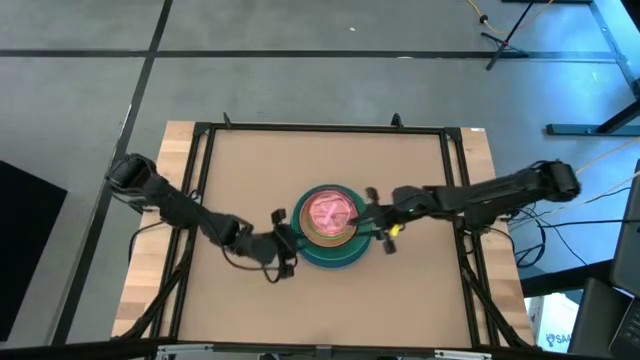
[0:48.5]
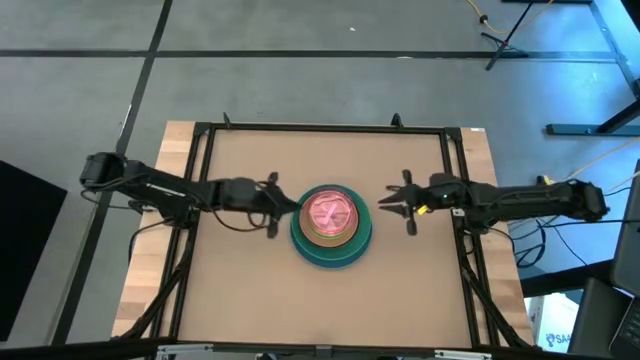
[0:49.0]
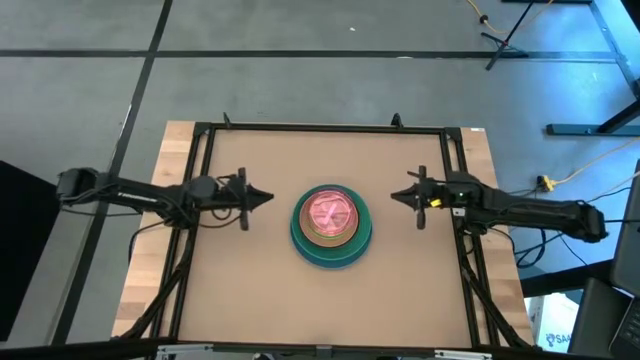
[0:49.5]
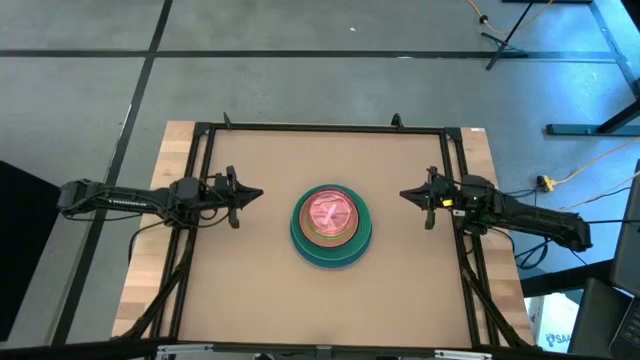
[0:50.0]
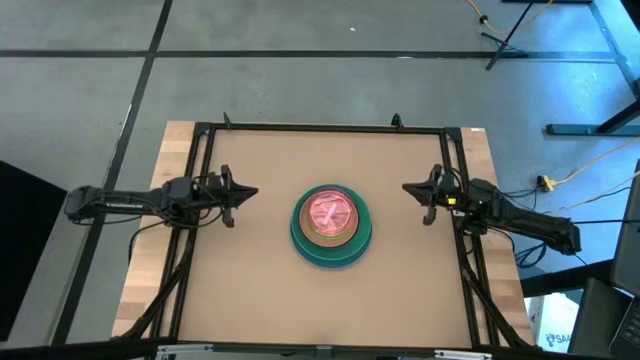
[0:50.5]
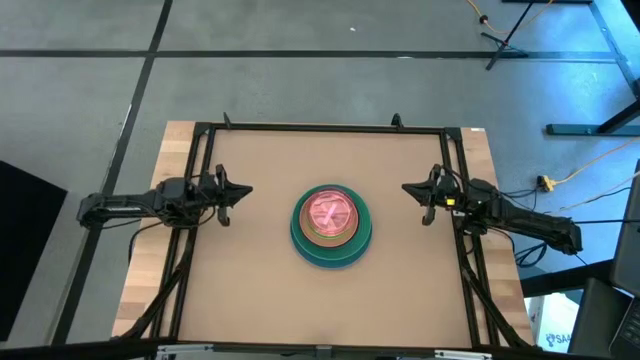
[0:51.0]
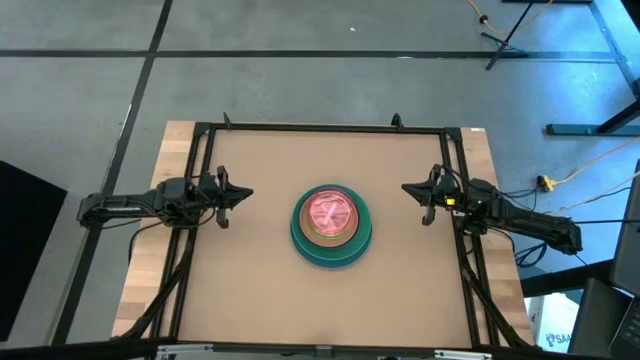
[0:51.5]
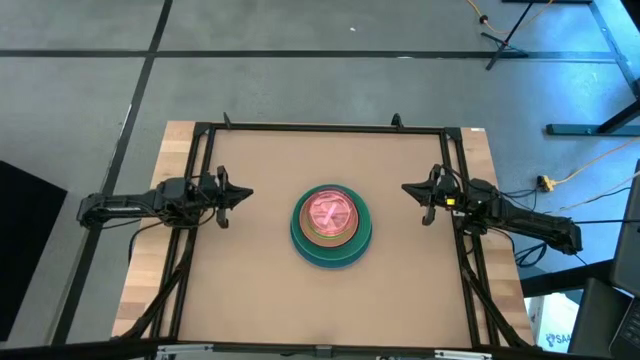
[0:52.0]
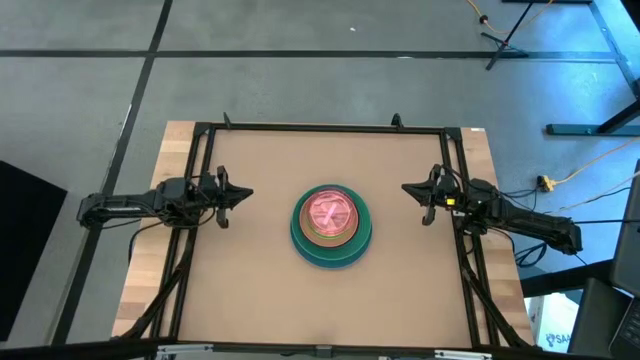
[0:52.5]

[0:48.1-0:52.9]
Task: Stack plastic plates
Return to Home Position

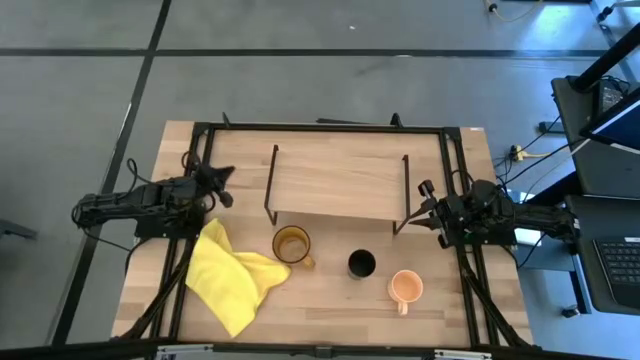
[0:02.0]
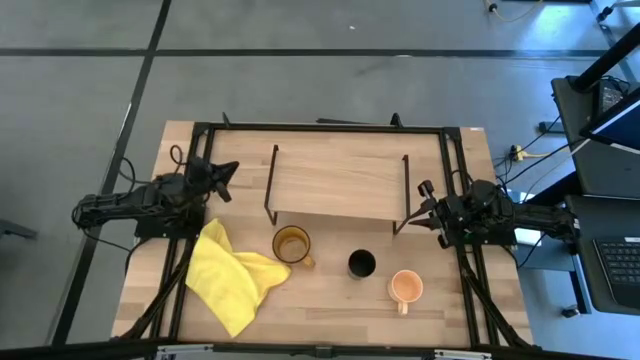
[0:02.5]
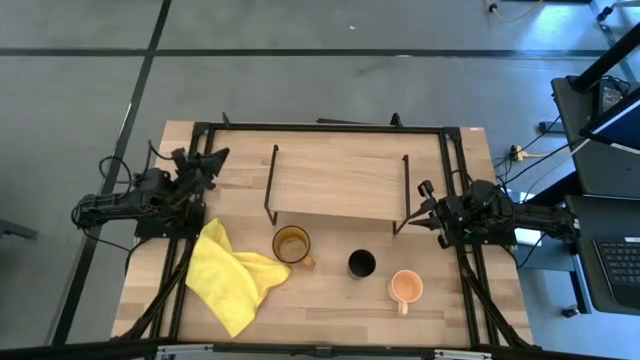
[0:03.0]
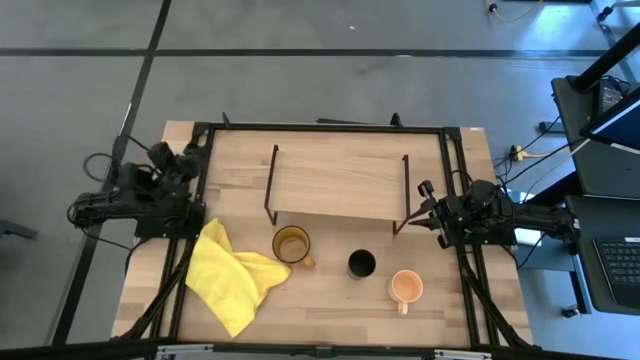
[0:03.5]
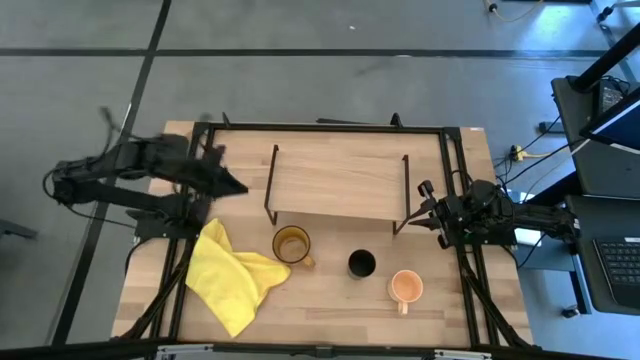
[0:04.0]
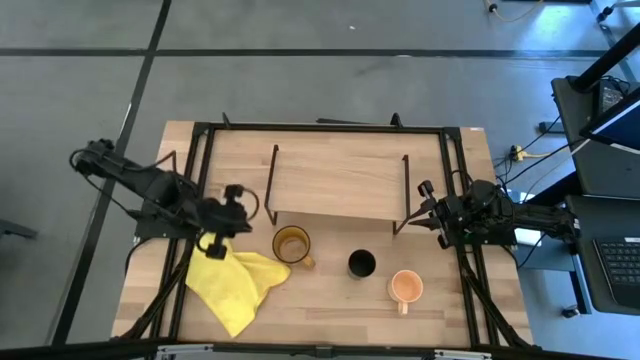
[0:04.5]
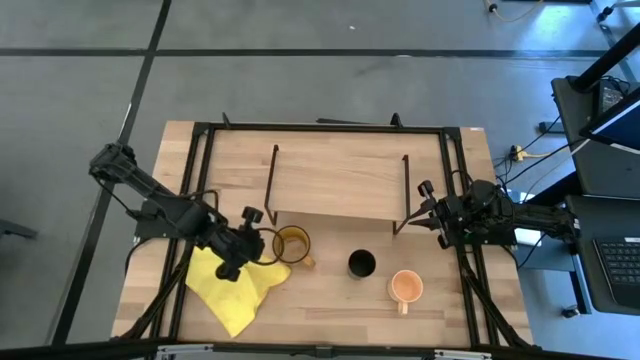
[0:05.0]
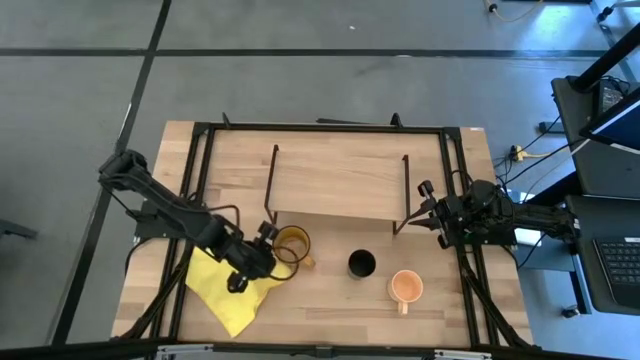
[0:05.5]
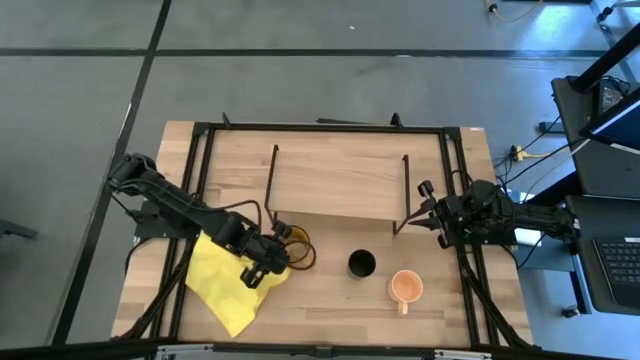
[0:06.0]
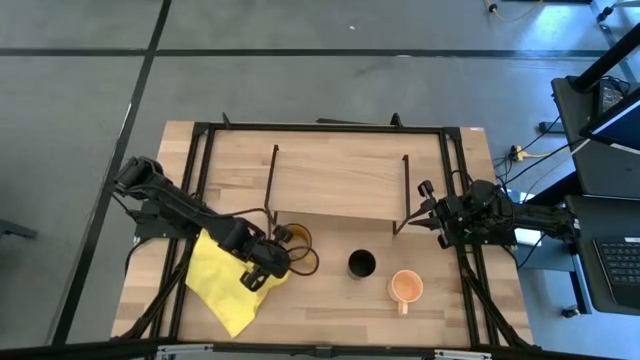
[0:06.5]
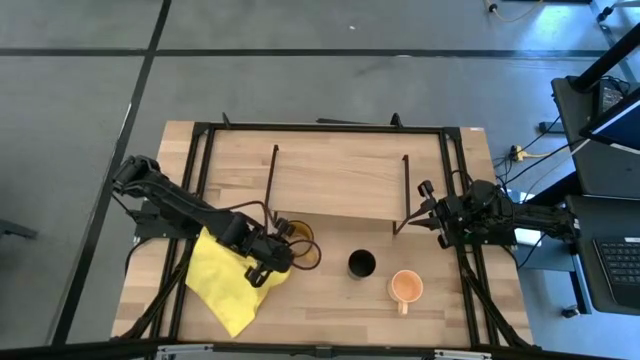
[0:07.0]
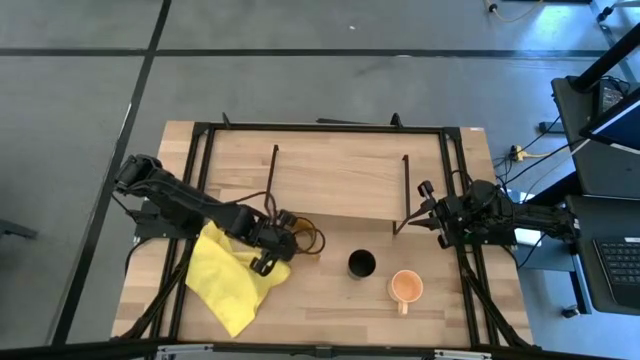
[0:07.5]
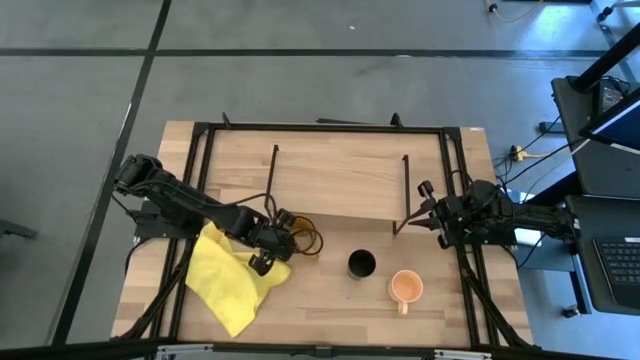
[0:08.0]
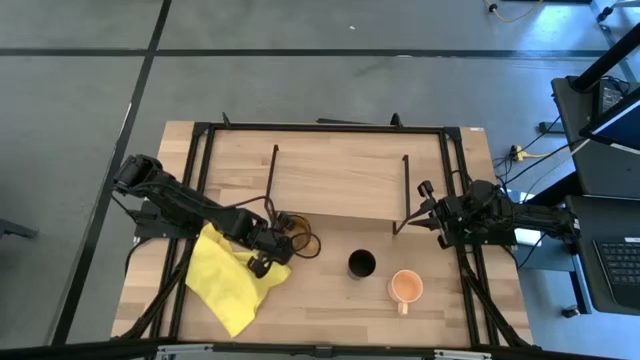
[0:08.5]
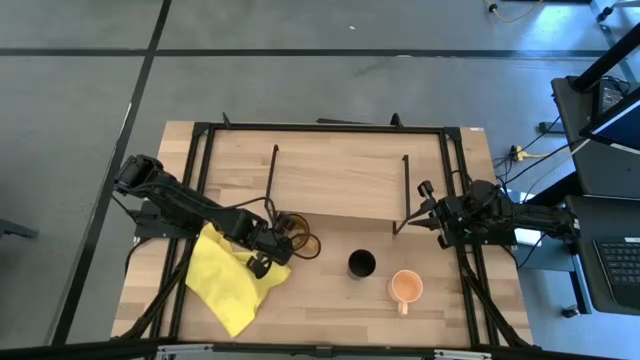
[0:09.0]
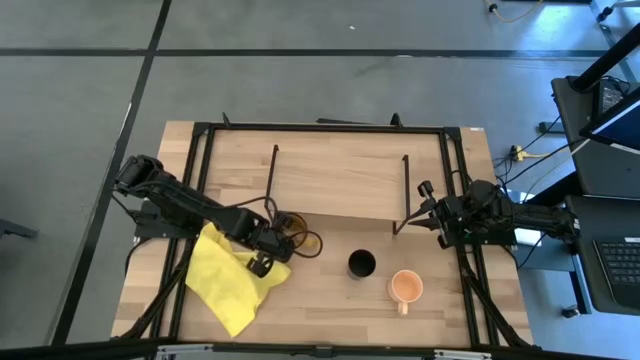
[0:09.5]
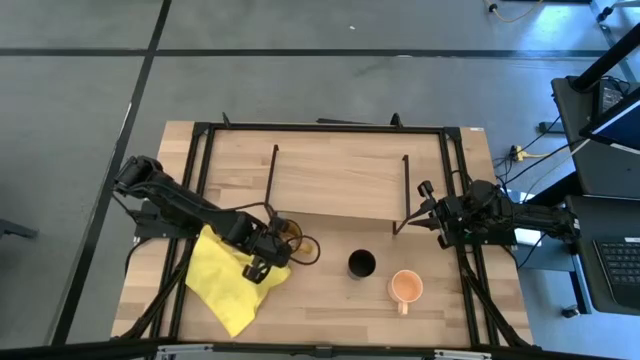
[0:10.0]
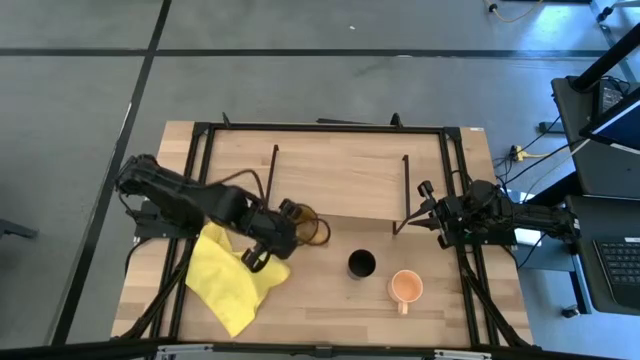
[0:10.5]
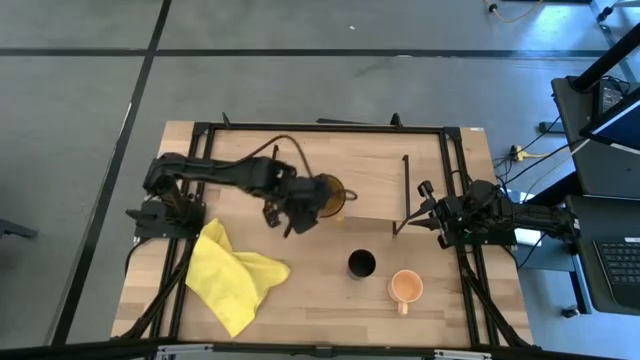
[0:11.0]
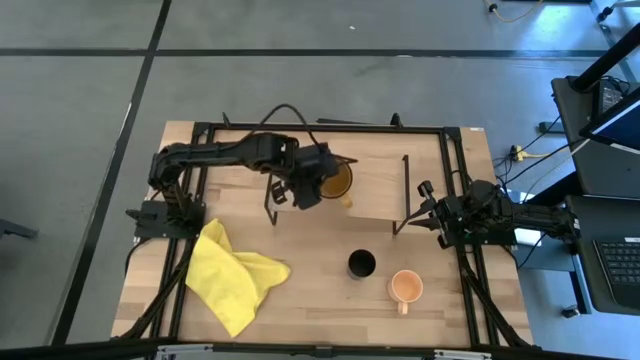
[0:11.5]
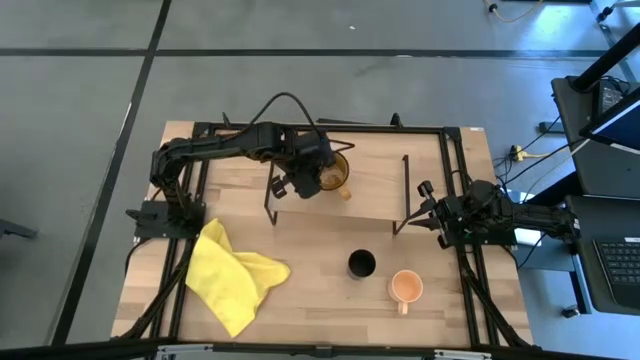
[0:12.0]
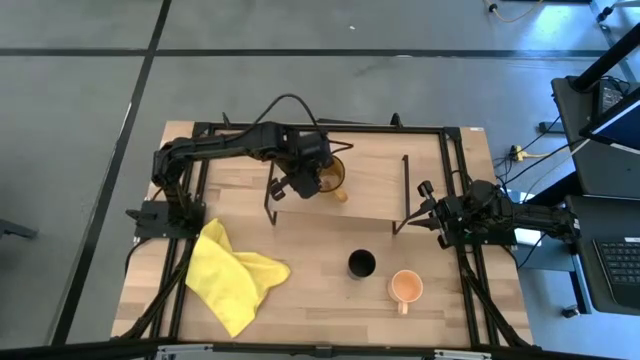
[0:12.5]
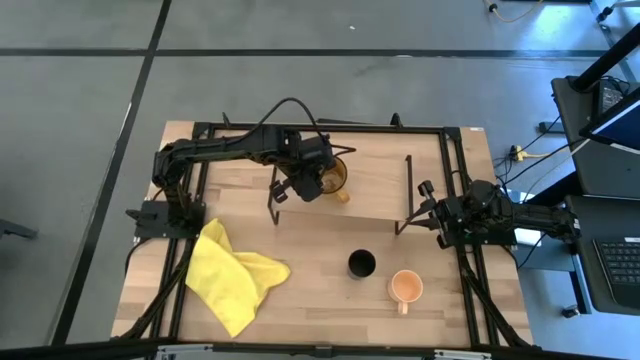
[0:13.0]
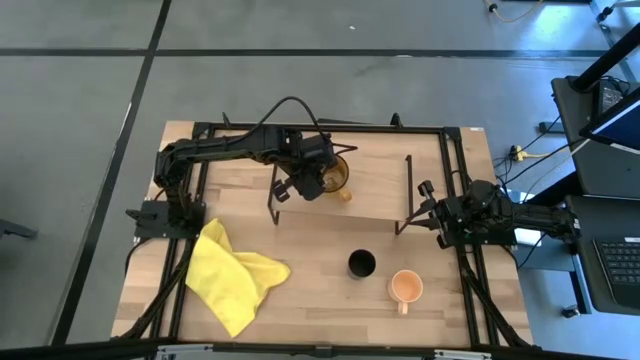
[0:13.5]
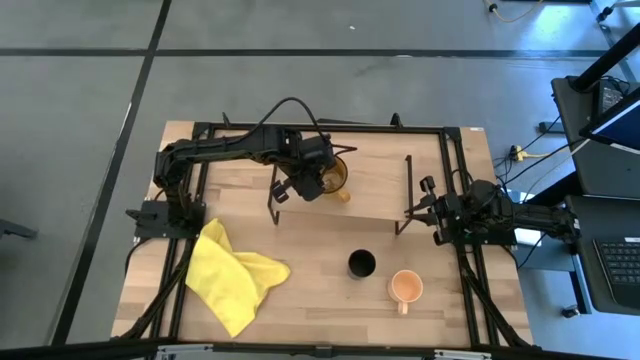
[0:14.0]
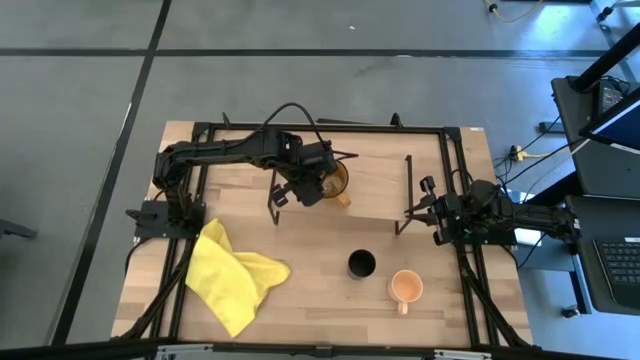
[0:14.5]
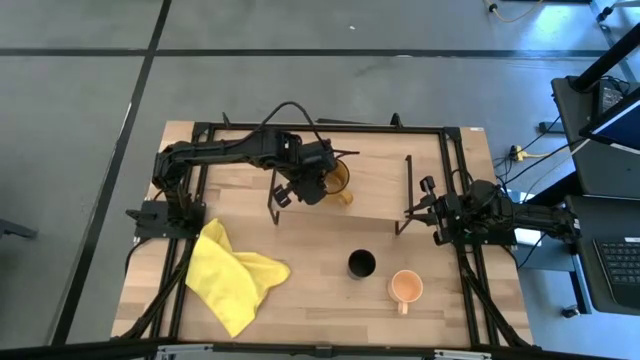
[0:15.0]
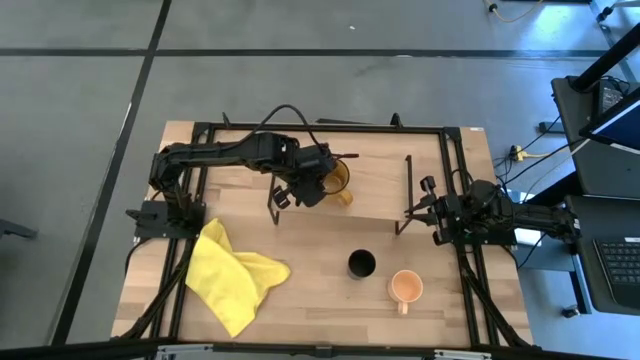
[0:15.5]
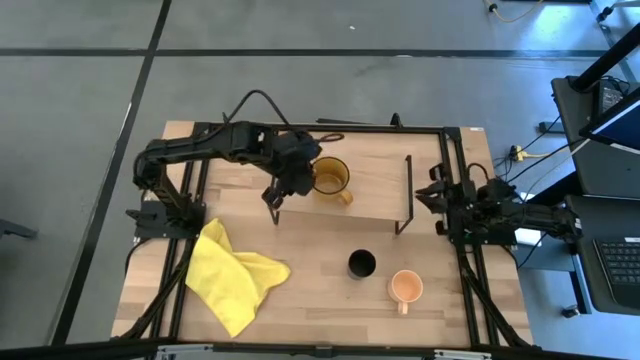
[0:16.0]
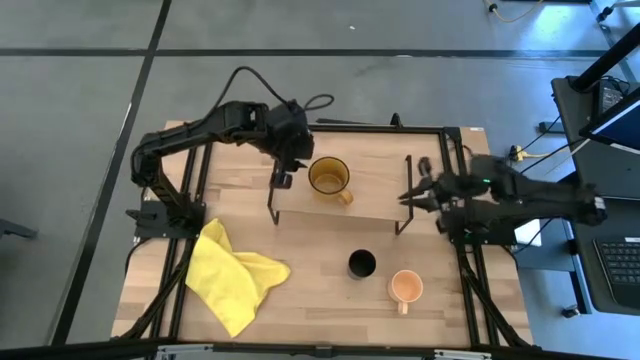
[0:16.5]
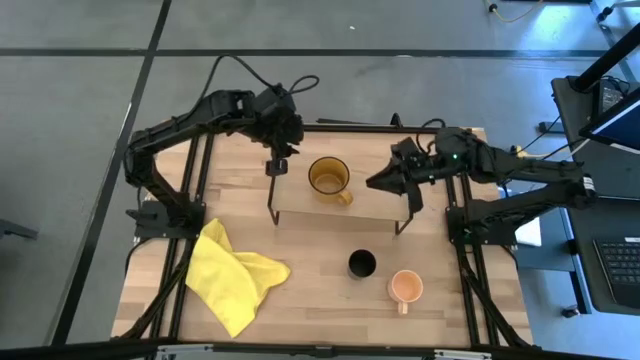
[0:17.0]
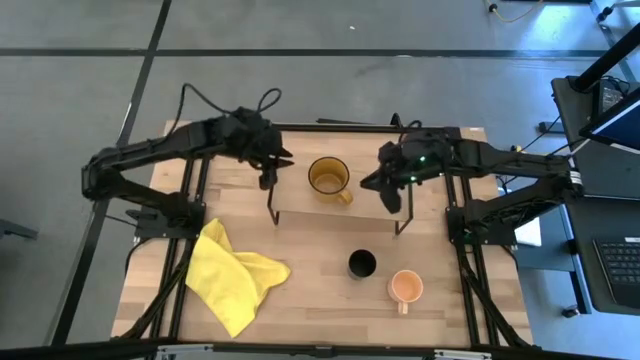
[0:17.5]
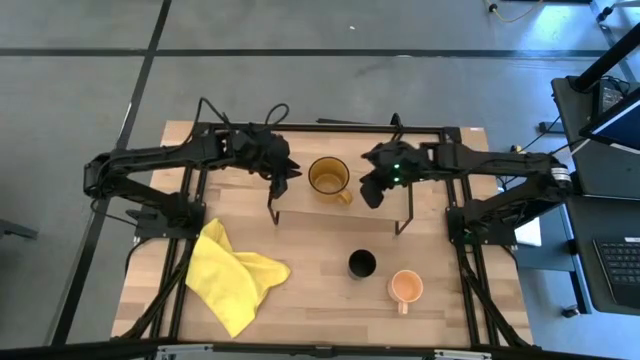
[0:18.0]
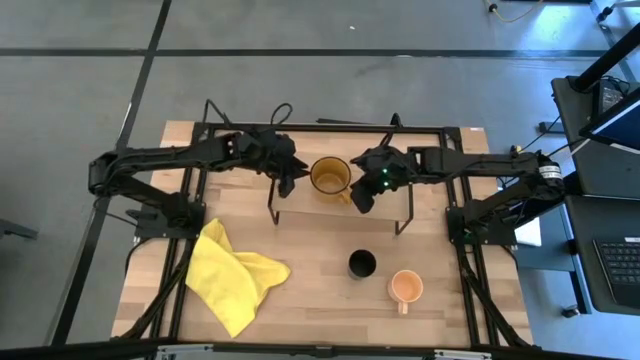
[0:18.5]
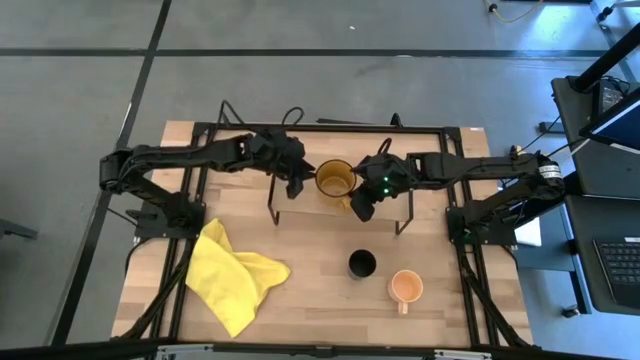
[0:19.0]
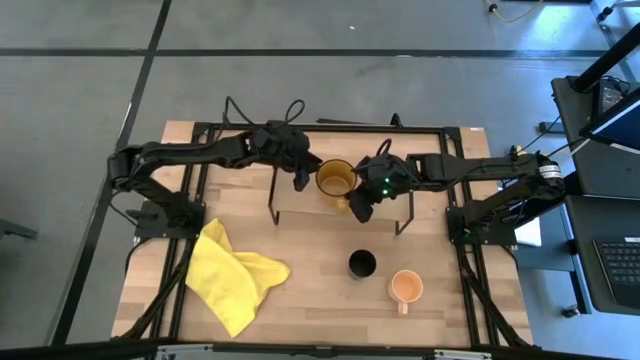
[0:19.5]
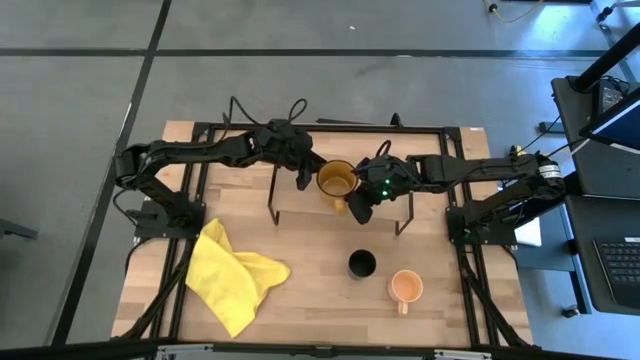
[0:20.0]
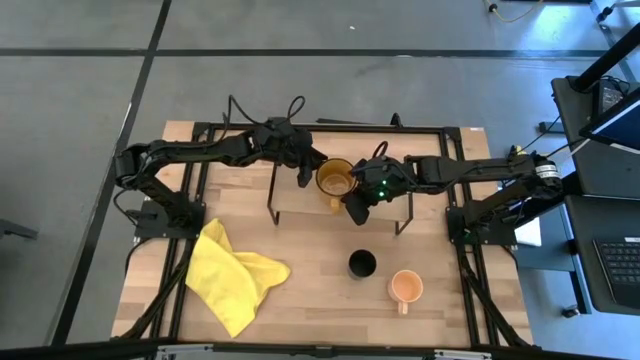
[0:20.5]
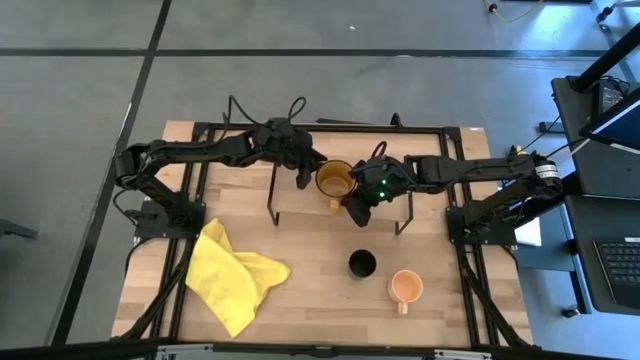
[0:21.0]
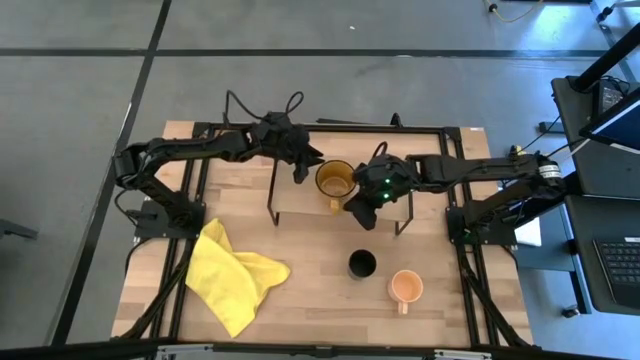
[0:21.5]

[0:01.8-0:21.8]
Task: Stack small to large cups/mugs on shelf
Put the yellow mug on the shelf
